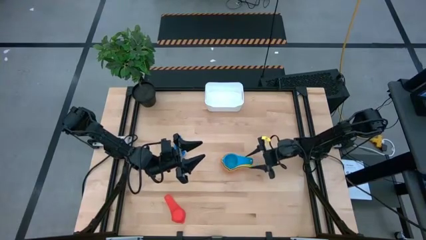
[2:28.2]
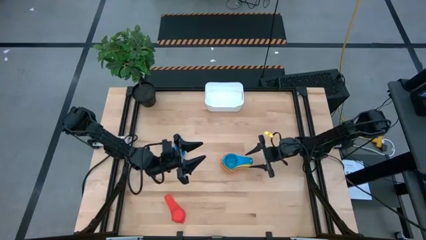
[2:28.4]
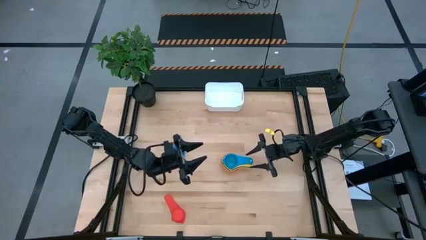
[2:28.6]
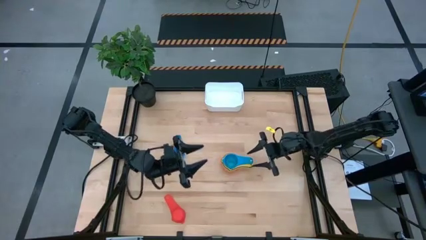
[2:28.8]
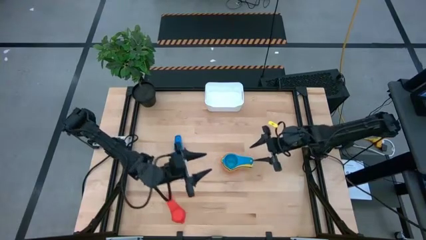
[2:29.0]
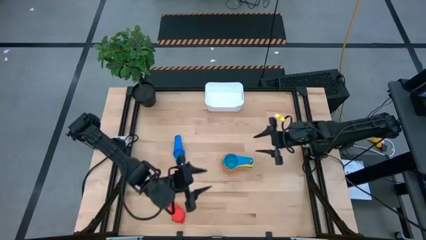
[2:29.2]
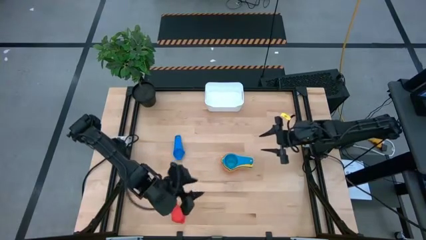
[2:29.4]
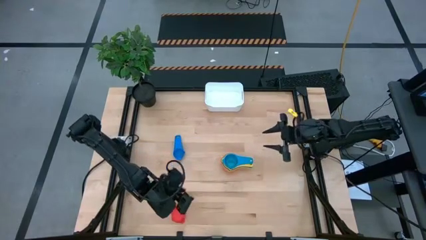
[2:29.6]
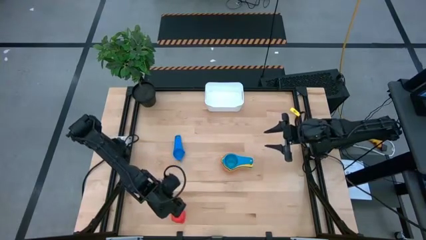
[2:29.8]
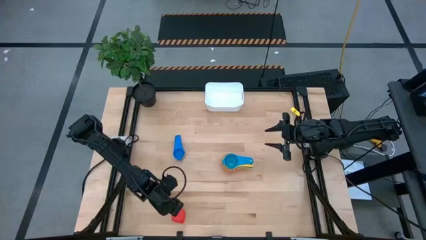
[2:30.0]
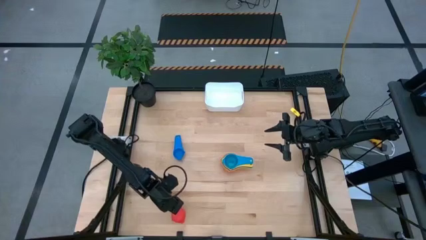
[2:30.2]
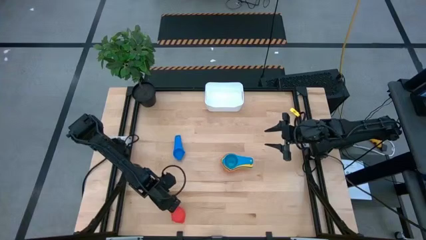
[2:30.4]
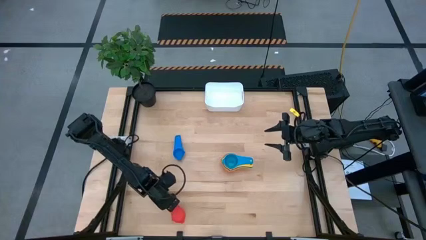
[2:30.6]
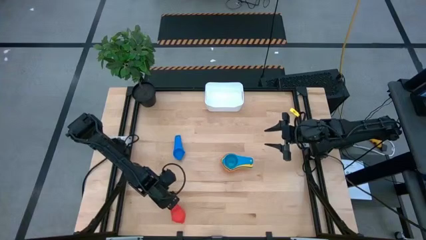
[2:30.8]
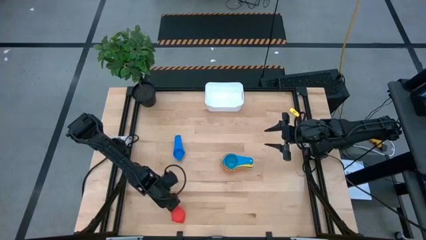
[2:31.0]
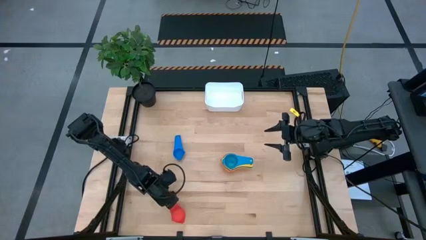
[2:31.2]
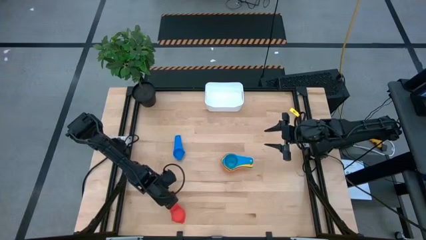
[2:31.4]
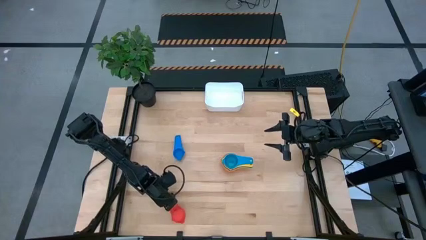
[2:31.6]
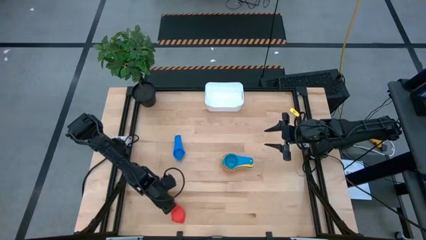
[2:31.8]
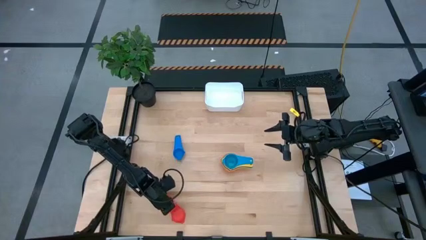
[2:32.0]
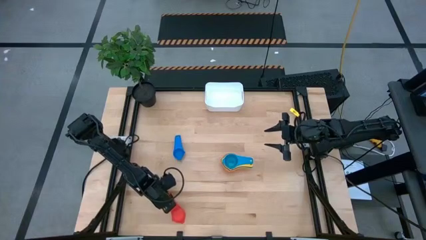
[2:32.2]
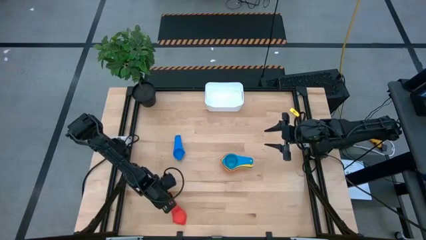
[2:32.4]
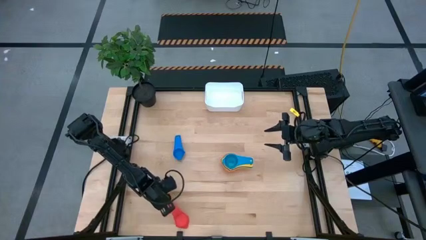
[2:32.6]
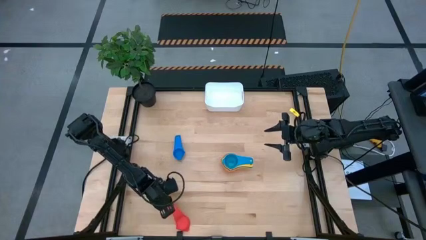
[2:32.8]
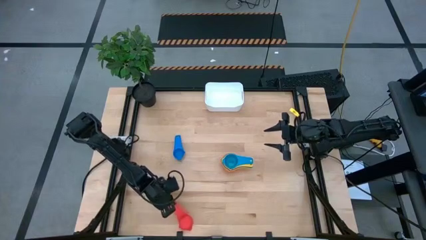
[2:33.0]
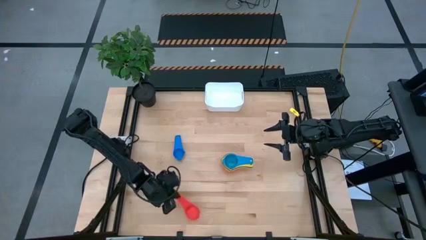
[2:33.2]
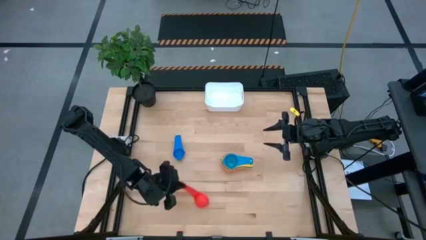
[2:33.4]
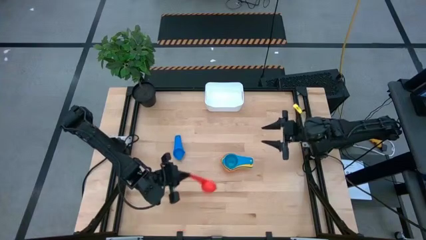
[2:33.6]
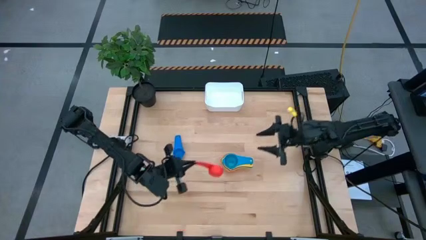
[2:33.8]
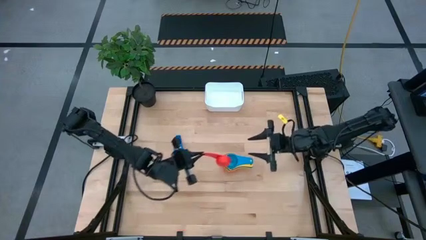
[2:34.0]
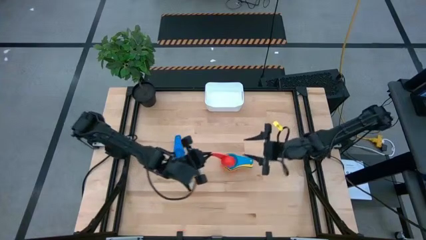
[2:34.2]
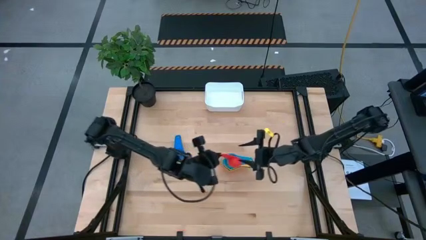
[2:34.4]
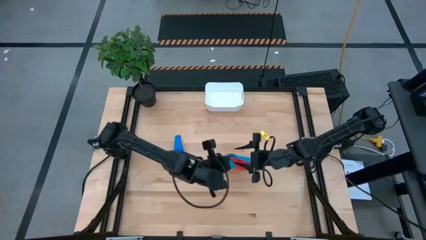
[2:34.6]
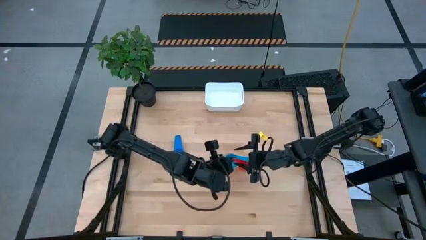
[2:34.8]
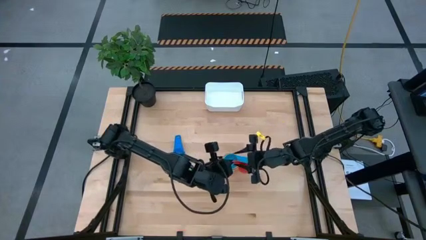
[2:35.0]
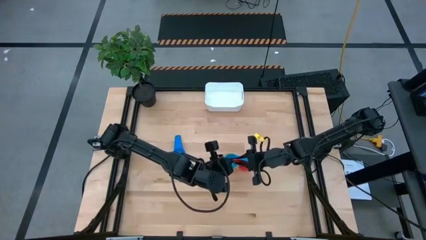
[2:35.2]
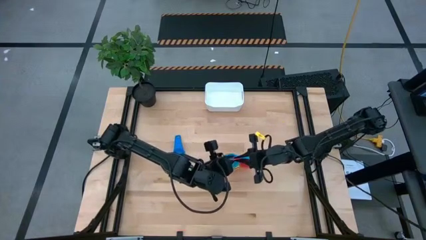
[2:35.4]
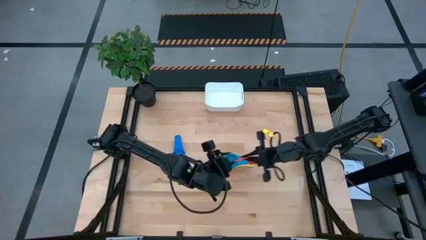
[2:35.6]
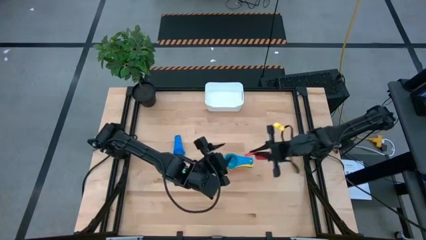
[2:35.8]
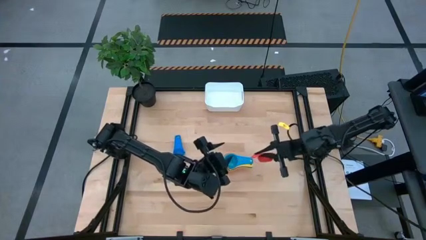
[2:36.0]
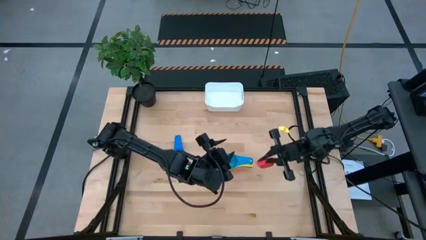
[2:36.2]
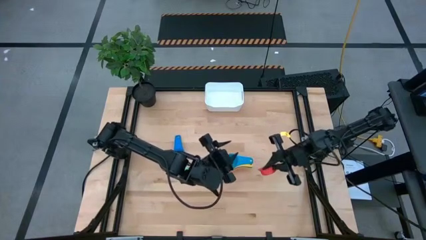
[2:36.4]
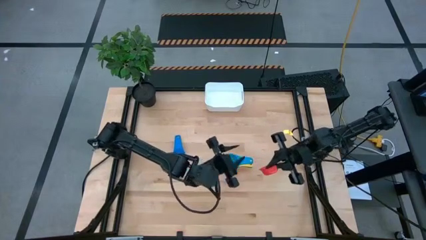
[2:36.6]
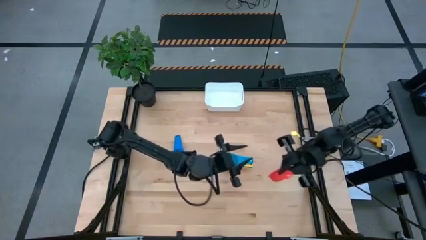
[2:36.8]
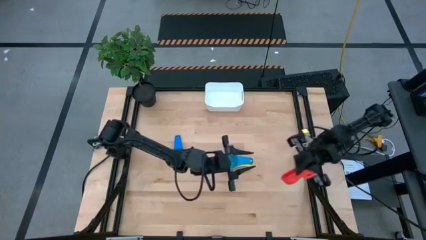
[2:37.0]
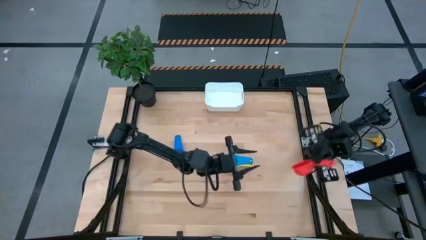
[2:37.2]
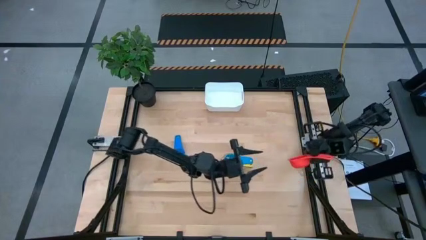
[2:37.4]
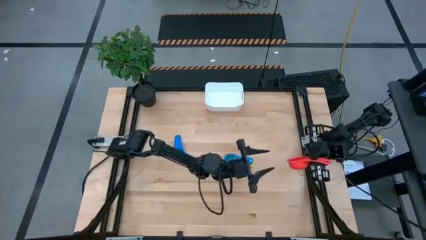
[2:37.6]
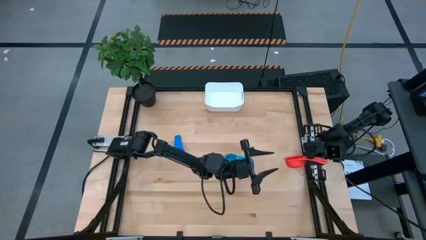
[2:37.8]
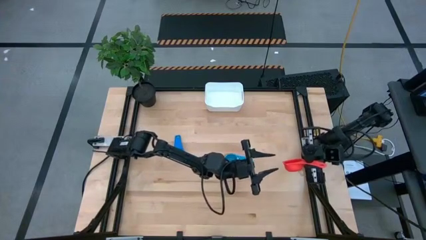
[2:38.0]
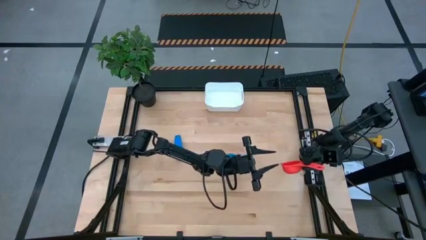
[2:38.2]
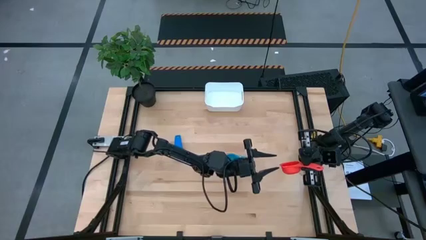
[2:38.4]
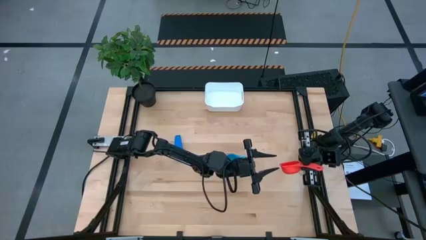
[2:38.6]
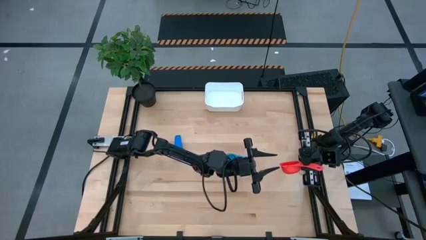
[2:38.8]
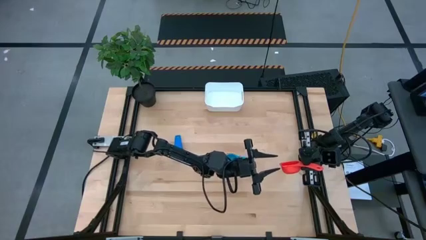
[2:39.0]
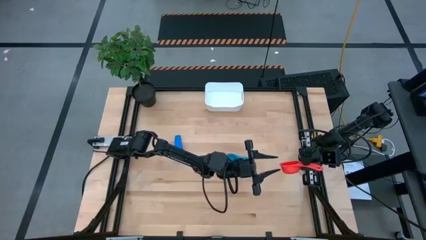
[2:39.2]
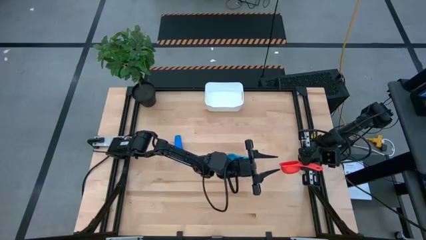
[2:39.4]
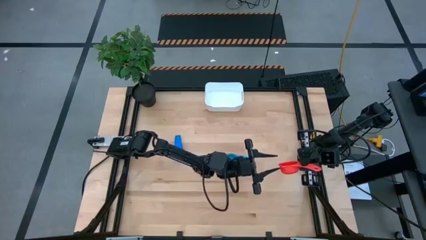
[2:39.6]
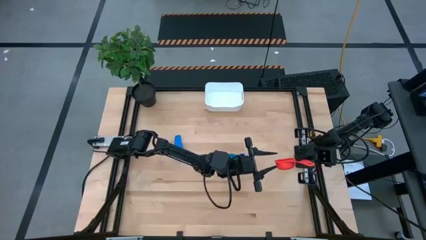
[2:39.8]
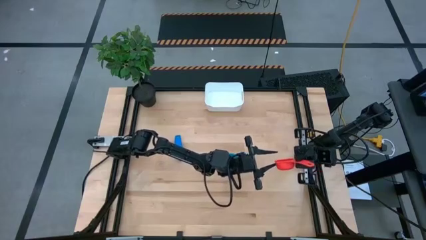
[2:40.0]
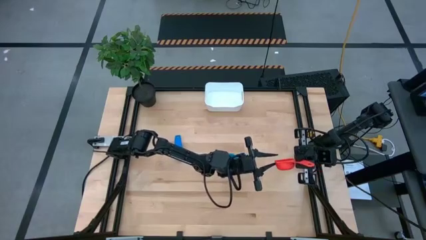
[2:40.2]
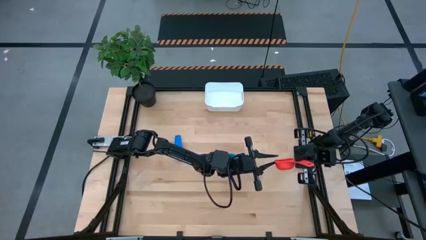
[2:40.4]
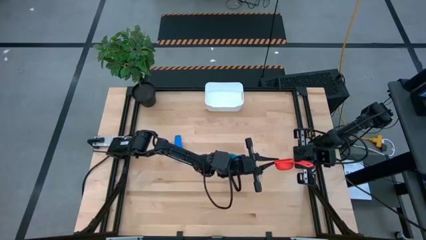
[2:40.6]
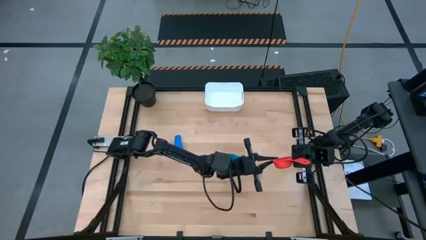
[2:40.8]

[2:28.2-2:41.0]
Task: Nest measuring cups in basket
Stack the red measuring cup on top of the light blue measuring cup

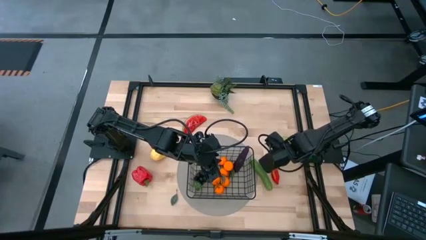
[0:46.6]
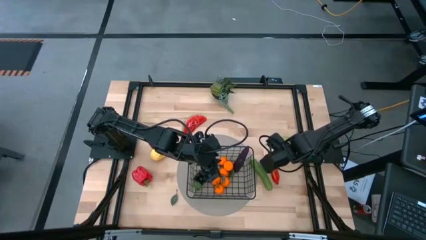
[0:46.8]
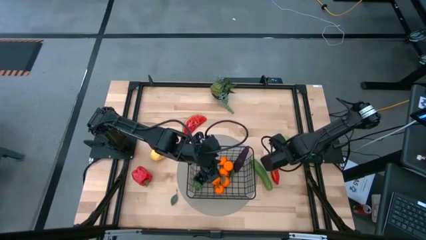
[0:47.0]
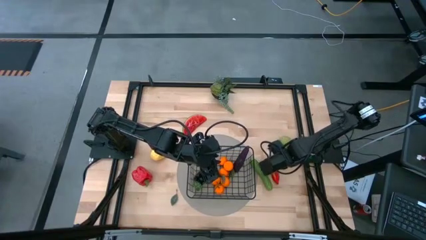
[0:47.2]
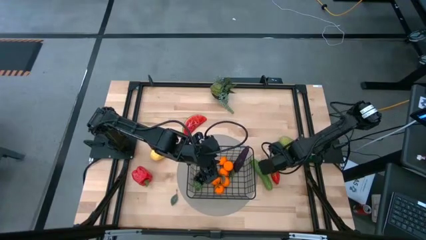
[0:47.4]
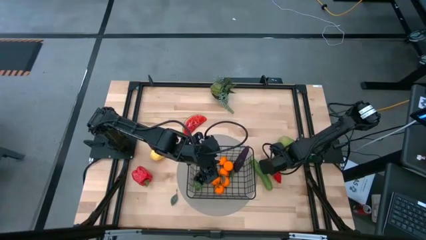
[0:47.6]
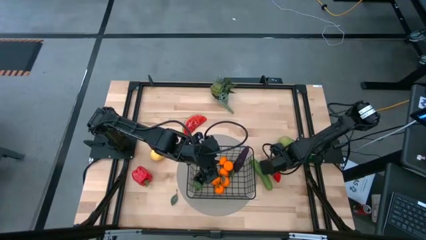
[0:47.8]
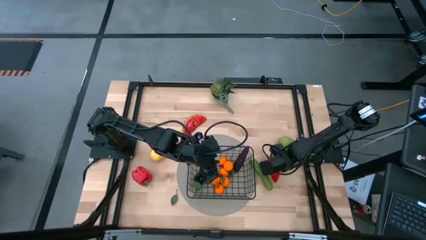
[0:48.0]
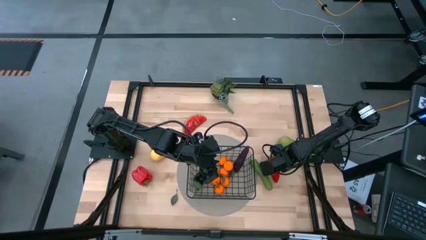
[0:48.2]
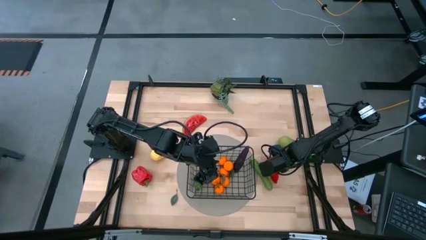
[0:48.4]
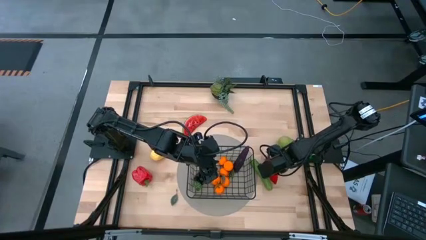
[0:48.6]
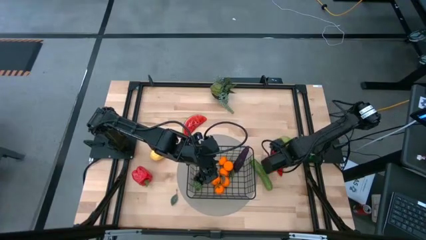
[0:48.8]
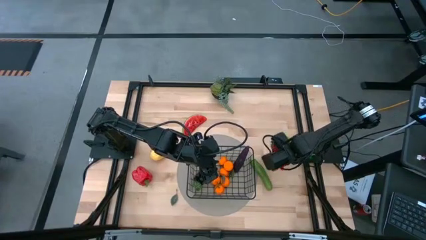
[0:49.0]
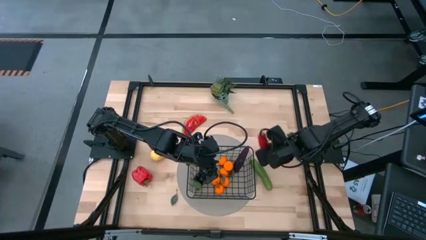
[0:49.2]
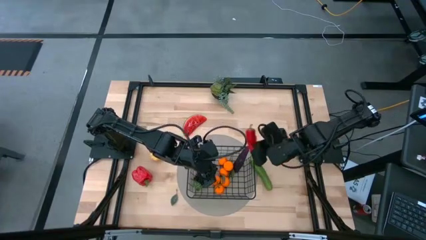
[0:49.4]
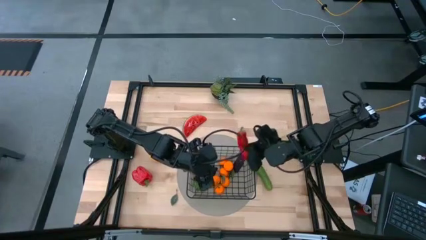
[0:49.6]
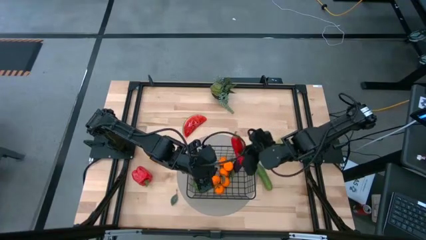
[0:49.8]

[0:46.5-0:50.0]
Task: Build produce basket
Put the red chili pepper into the black wire basket
